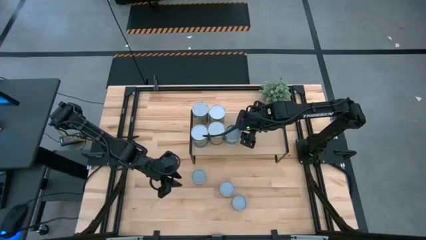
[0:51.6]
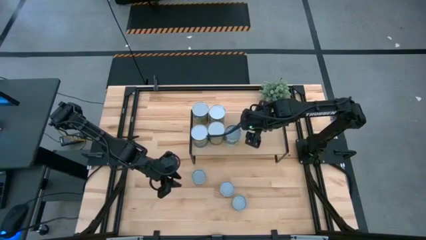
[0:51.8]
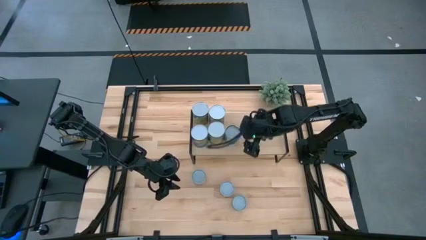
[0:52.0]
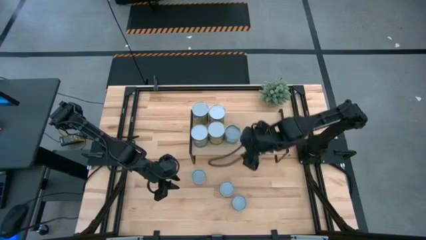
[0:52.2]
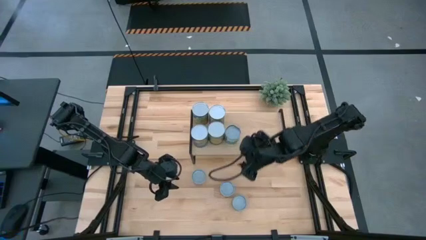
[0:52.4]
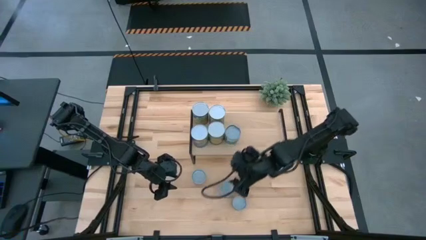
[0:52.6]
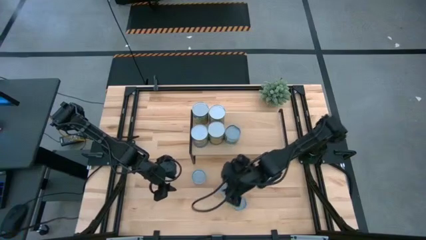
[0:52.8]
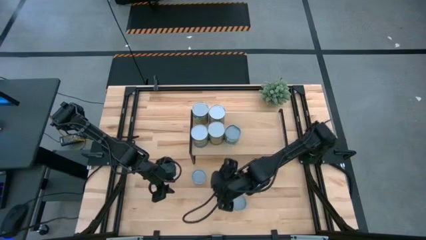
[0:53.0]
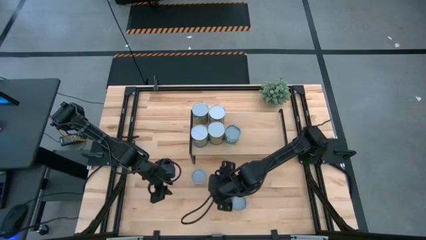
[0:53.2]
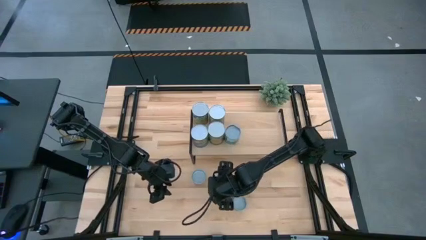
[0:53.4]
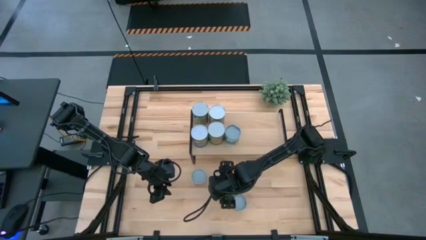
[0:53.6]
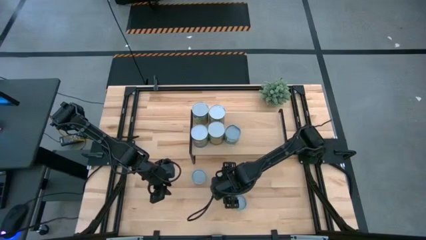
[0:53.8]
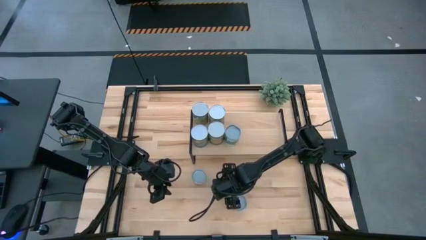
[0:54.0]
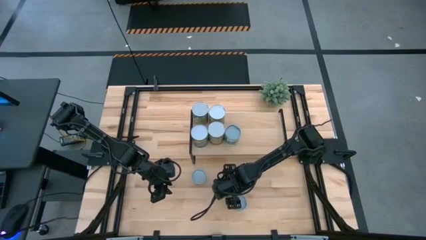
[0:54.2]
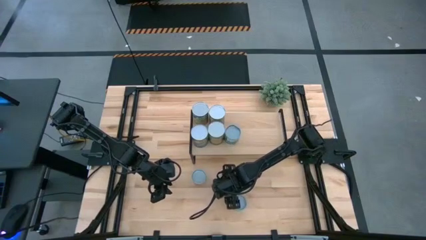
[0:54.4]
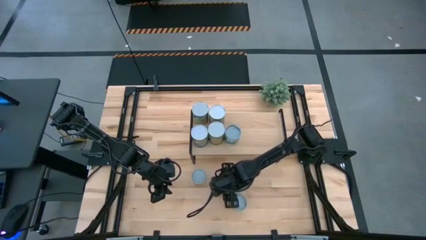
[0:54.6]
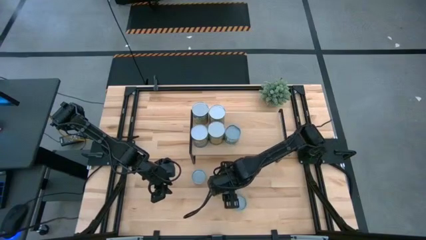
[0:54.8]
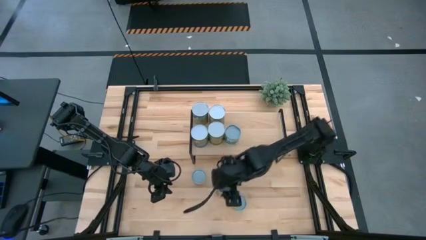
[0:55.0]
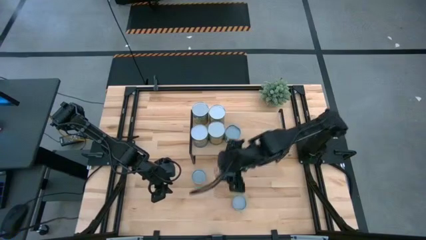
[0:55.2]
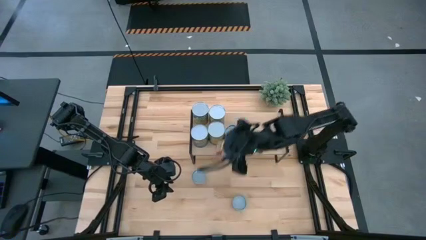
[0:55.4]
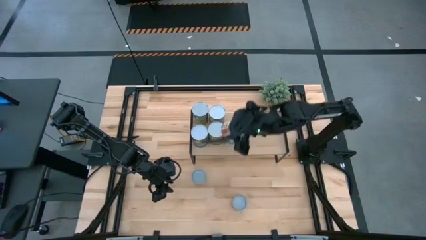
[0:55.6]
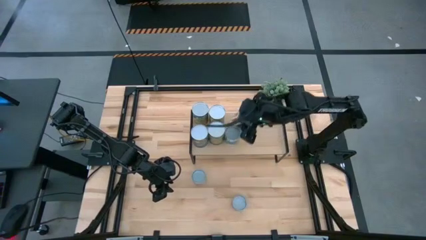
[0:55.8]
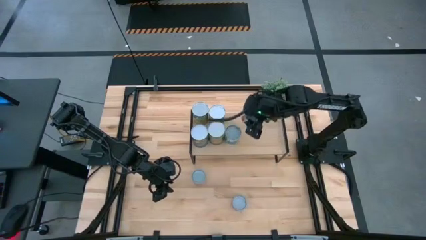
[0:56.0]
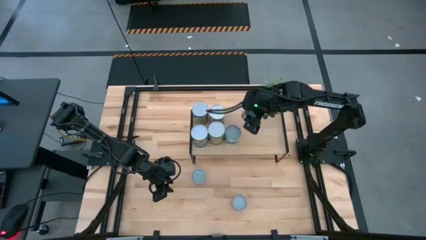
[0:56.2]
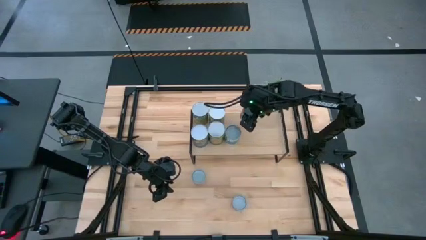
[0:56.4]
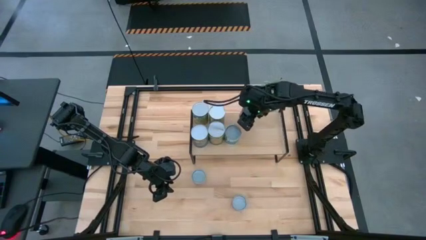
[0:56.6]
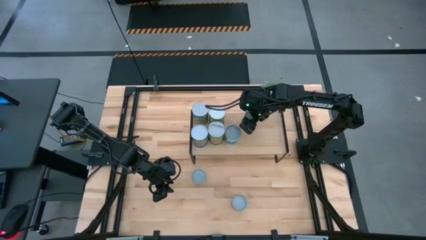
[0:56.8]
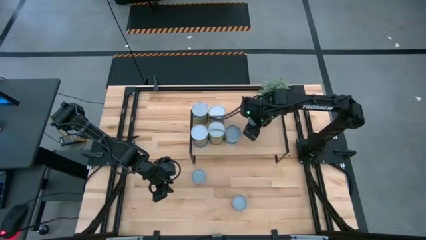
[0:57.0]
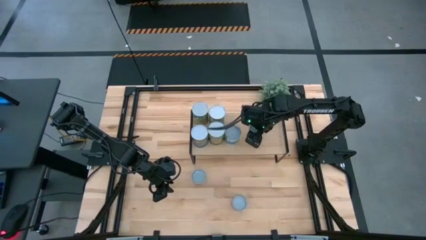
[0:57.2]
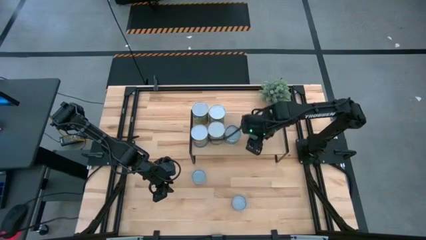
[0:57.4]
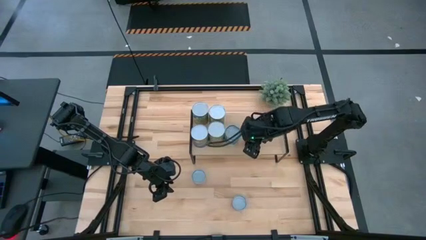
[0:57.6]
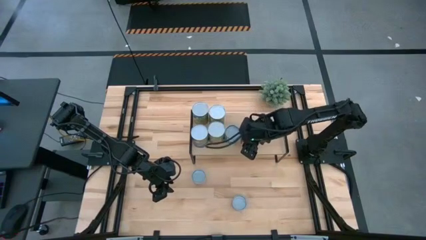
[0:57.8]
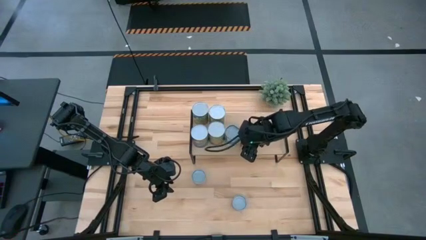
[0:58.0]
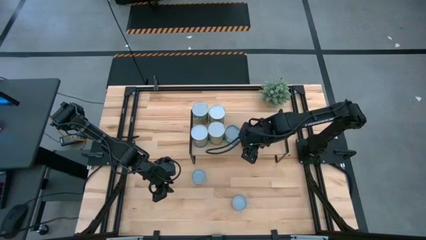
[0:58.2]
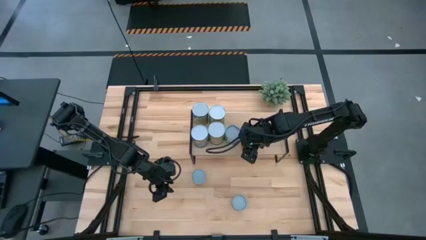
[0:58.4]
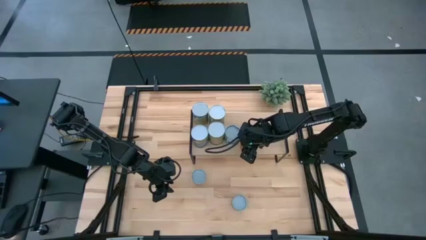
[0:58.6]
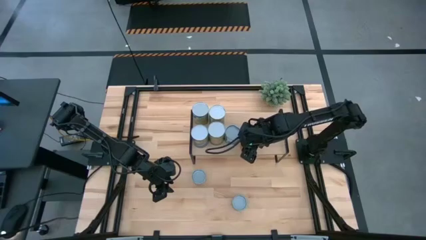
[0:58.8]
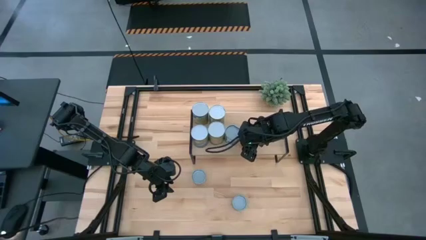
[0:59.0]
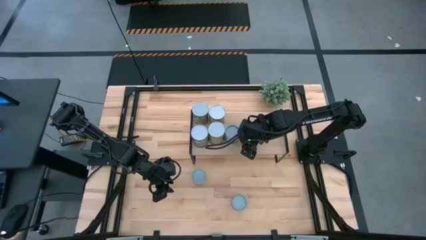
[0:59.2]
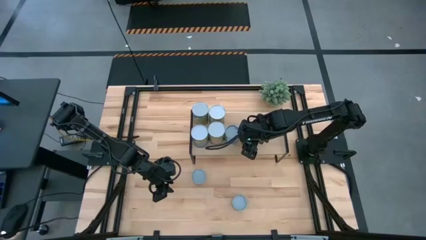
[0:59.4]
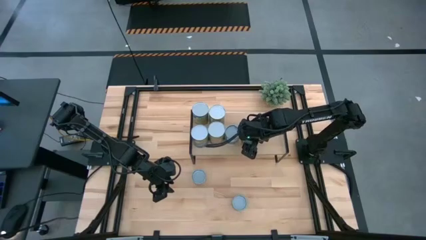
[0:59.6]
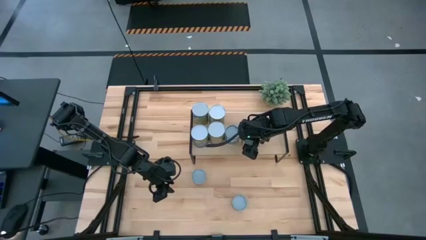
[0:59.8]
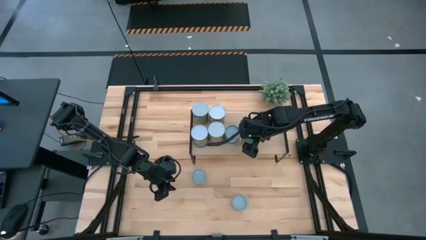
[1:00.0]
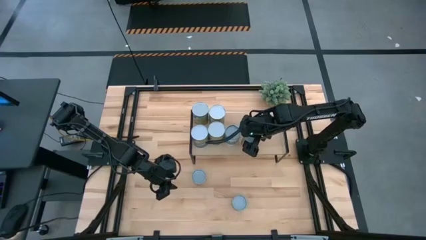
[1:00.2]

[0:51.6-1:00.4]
Task: Pick and place cans onto a shelf
Put the canned diced tomatoes on the shelf

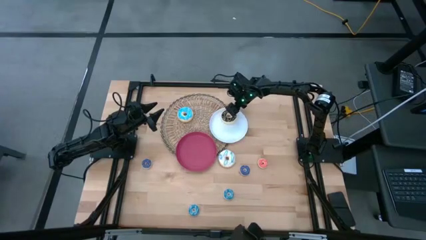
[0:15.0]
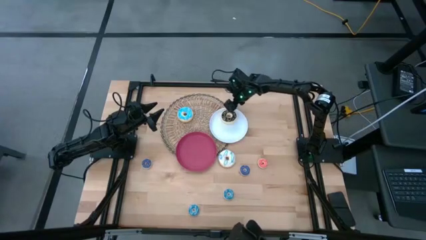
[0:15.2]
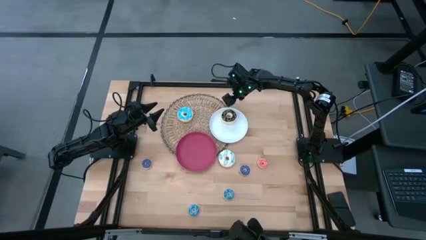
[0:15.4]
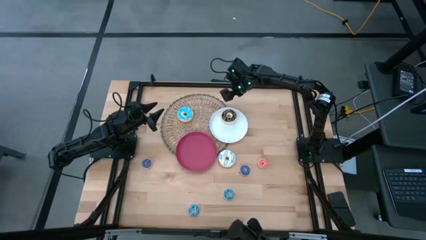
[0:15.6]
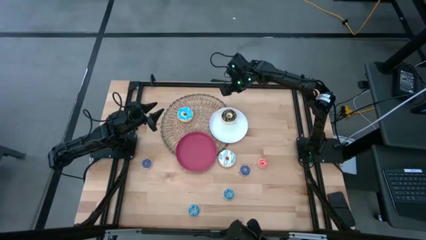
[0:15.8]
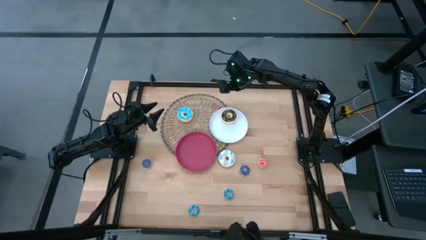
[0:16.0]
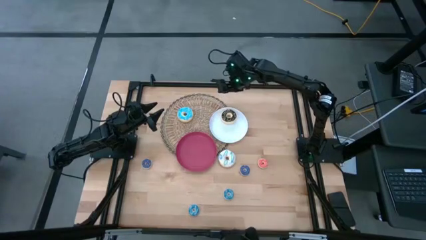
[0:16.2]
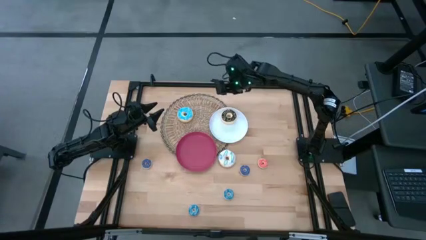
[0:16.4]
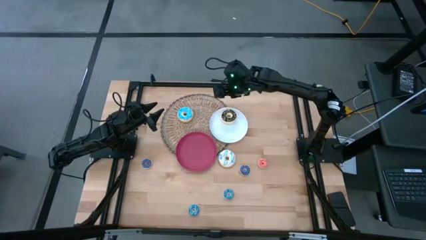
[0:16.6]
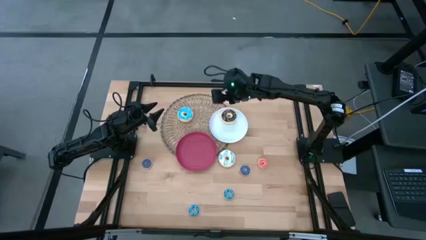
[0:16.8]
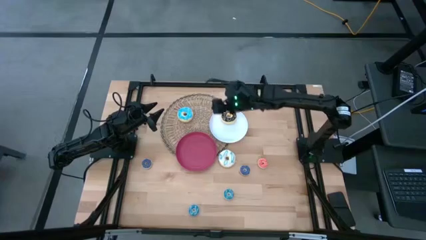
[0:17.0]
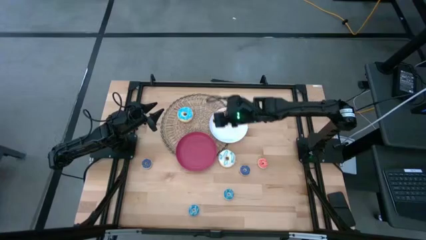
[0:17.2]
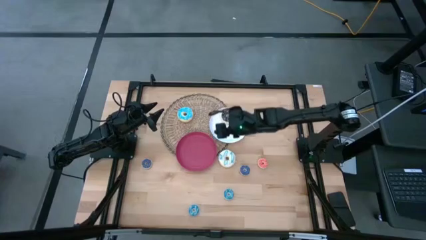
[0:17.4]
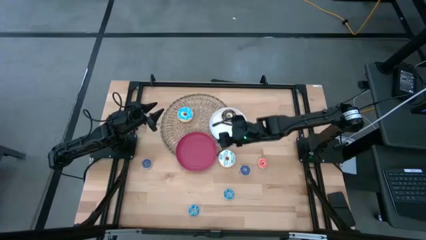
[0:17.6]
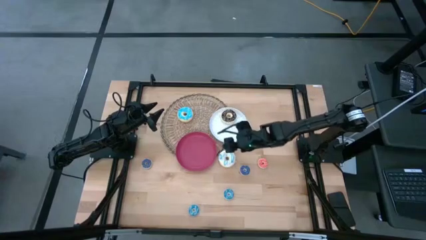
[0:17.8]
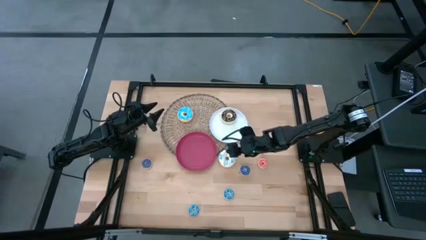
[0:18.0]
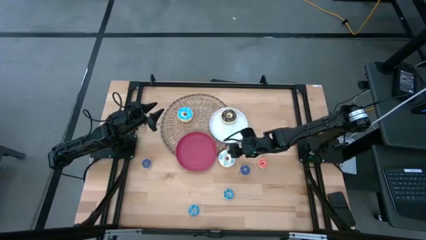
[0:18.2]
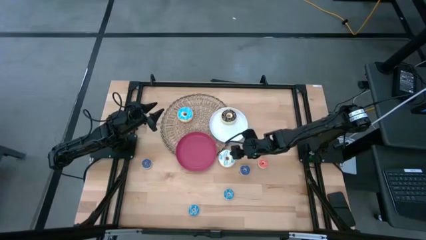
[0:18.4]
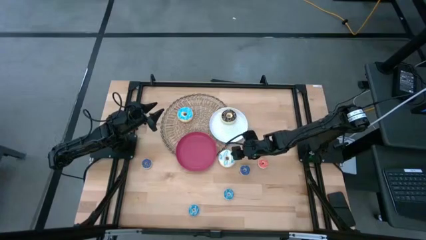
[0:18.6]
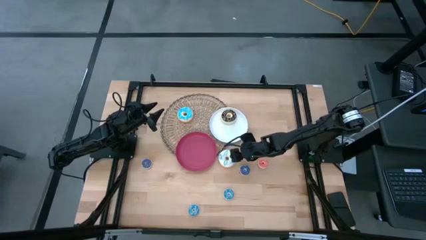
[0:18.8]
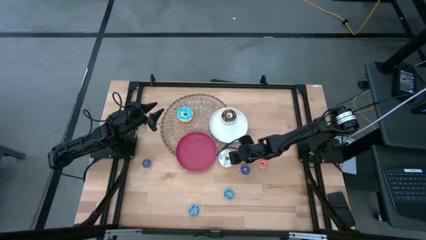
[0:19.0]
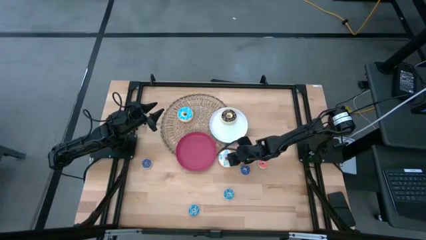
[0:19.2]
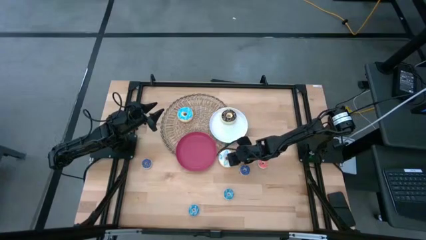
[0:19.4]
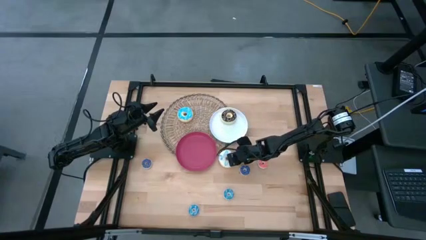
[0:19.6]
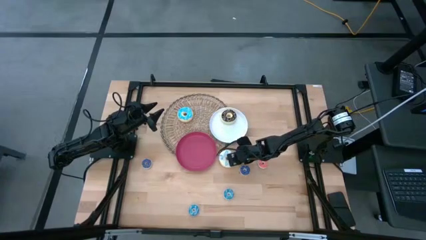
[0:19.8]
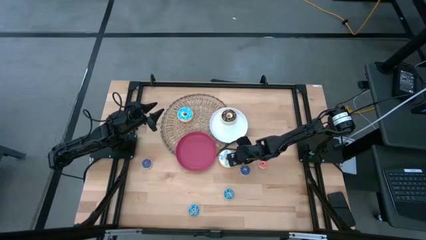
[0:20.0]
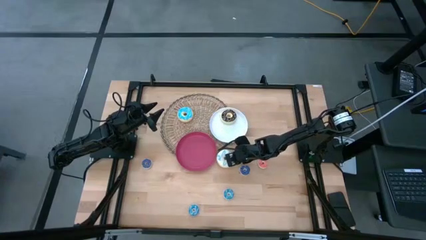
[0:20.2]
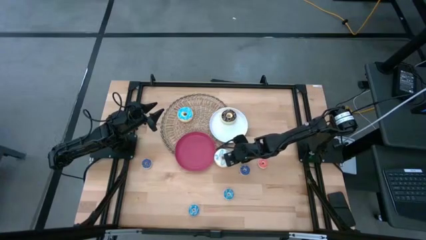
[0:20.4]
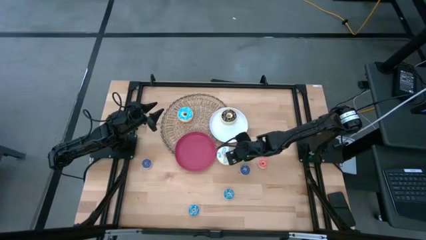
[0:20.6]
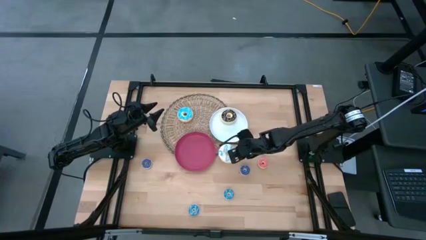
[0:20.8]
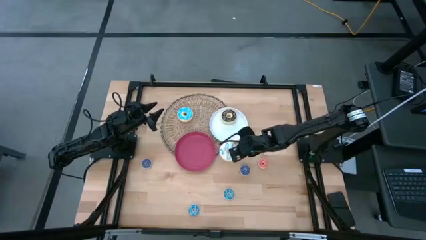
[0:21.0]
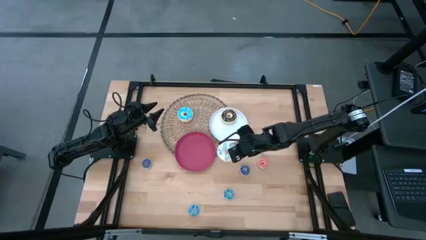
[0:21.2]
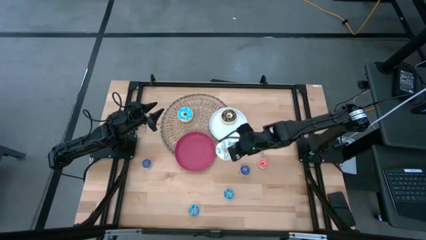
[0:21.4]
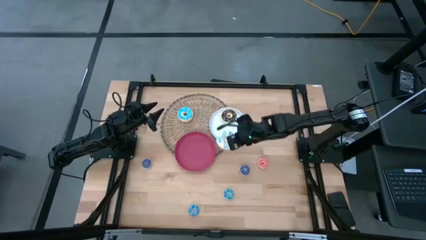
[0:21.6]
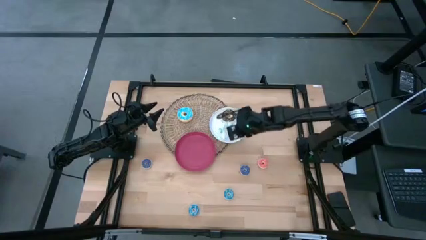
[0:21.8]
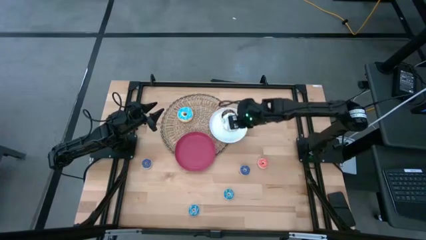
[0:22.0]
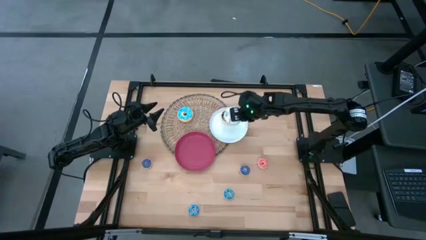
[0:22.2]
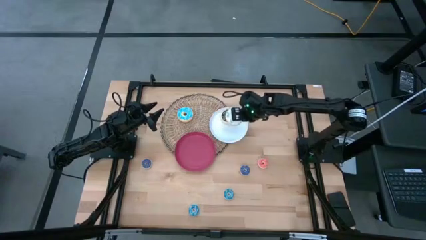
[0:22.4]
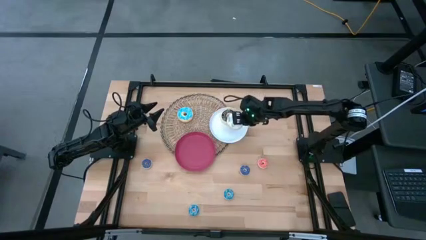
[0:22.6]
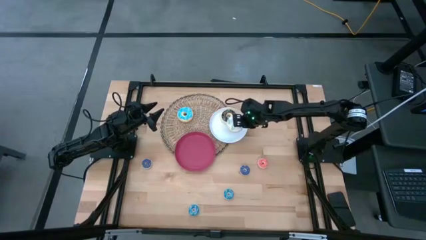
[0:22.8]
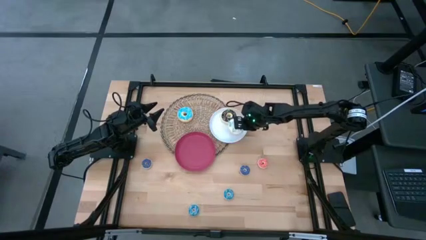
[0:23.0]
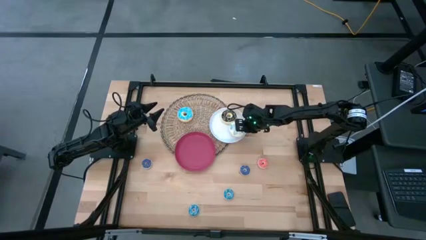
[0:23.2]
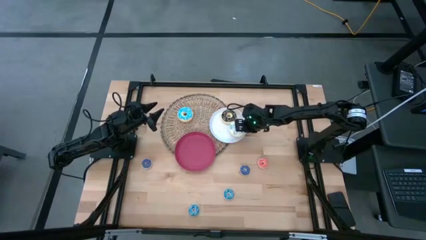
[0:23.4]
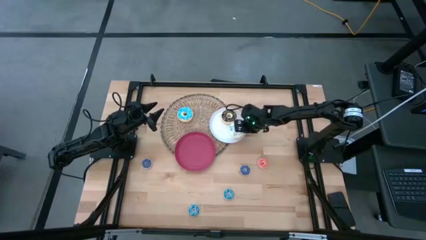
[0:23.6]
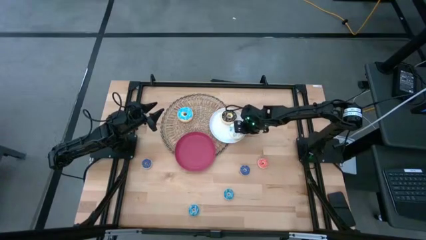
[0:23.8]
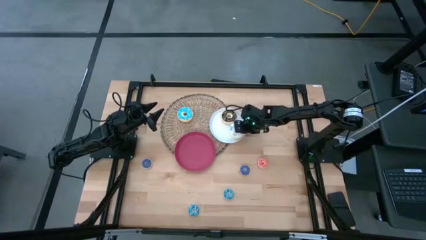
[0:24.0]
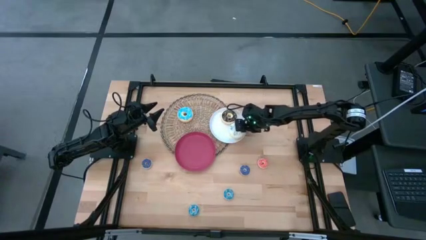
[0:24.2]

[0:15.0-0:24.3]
Task: Pick & Place donuts
Put the white donut on the white plate
